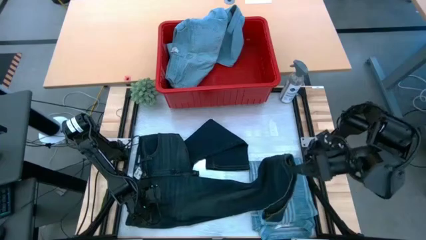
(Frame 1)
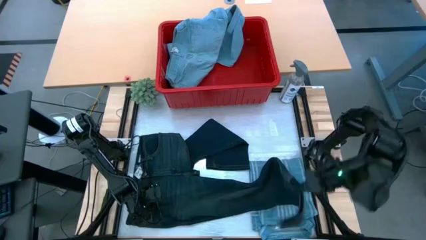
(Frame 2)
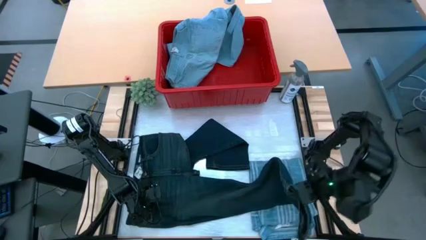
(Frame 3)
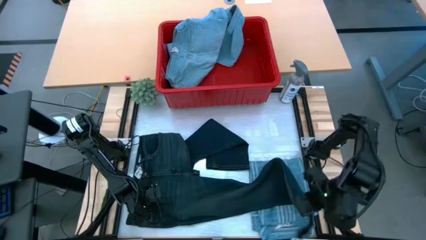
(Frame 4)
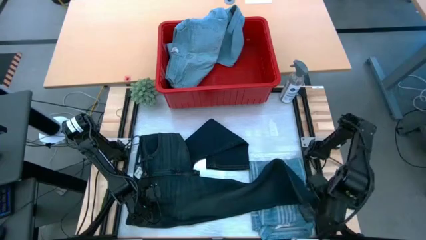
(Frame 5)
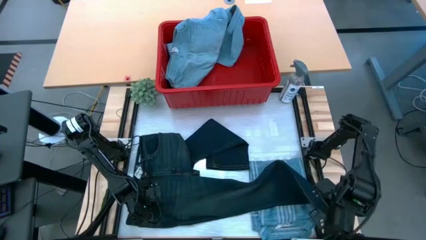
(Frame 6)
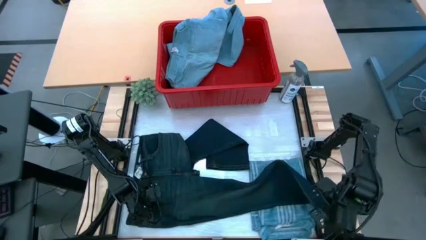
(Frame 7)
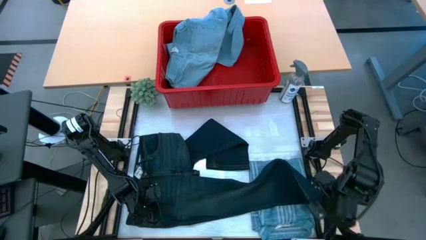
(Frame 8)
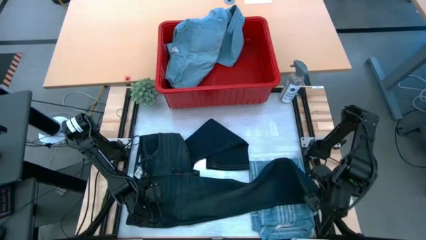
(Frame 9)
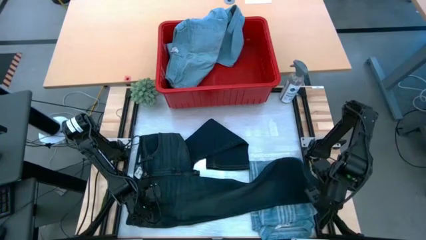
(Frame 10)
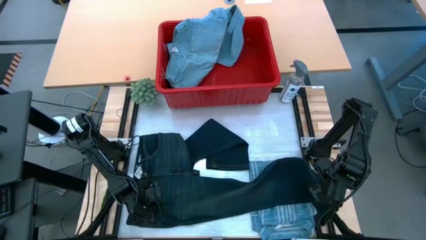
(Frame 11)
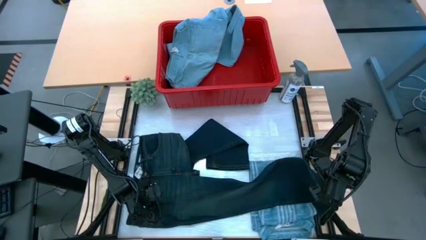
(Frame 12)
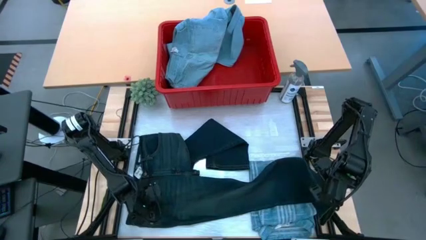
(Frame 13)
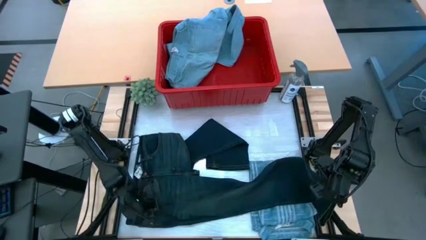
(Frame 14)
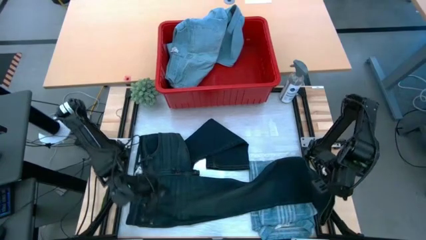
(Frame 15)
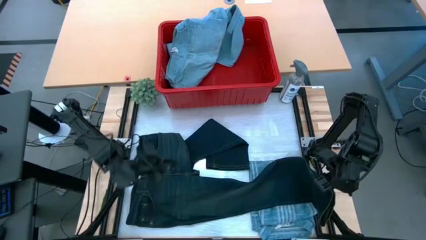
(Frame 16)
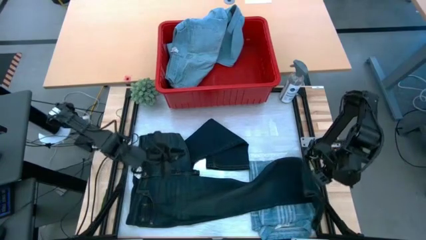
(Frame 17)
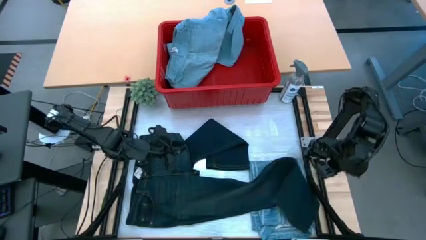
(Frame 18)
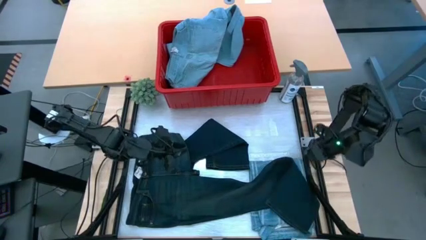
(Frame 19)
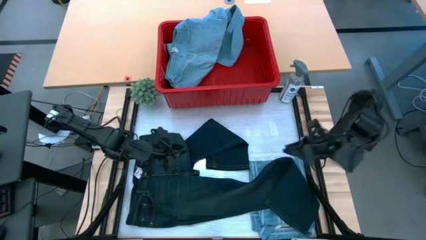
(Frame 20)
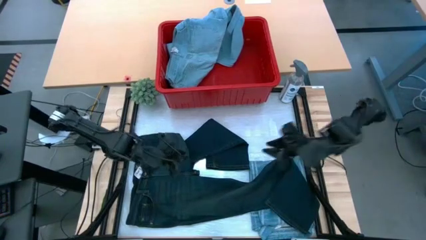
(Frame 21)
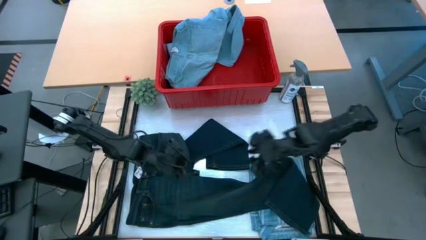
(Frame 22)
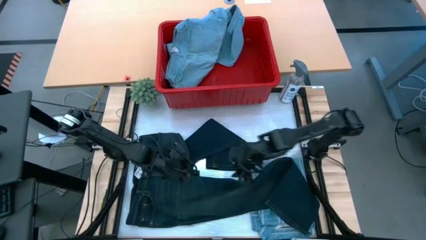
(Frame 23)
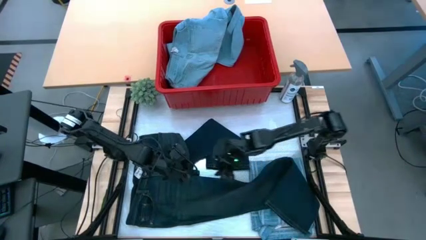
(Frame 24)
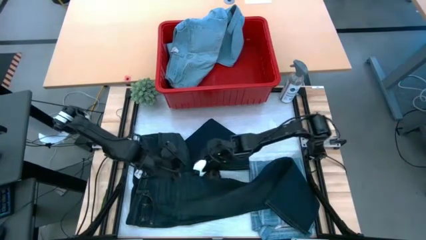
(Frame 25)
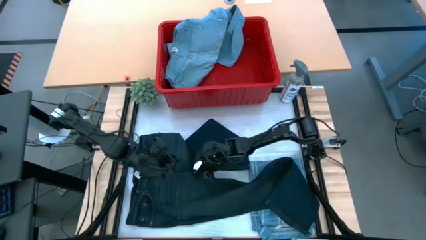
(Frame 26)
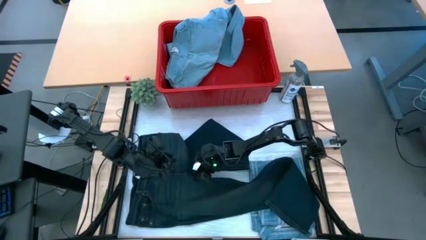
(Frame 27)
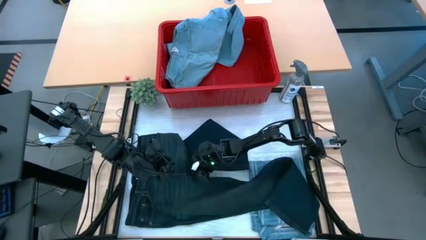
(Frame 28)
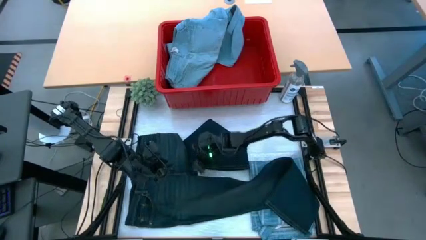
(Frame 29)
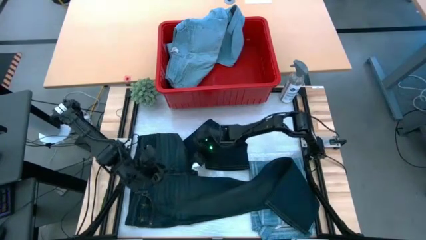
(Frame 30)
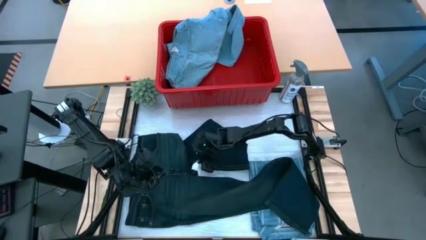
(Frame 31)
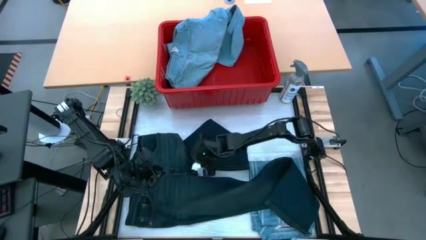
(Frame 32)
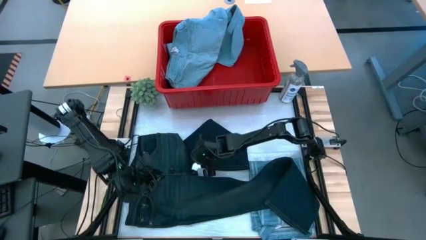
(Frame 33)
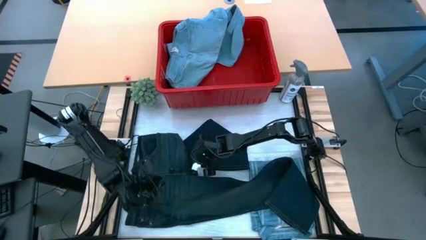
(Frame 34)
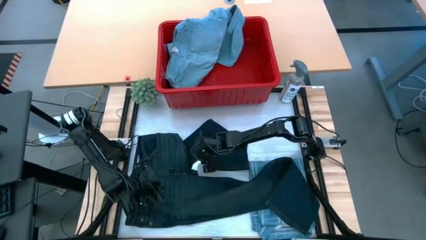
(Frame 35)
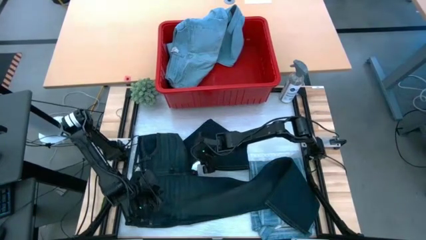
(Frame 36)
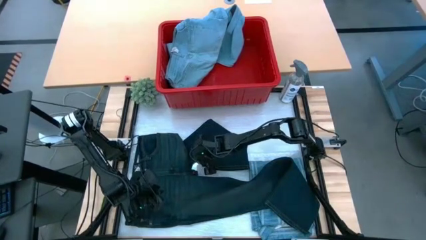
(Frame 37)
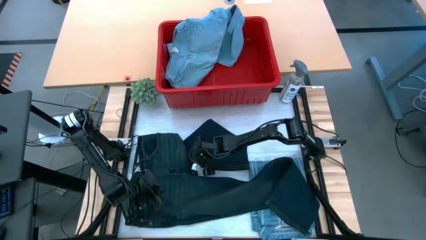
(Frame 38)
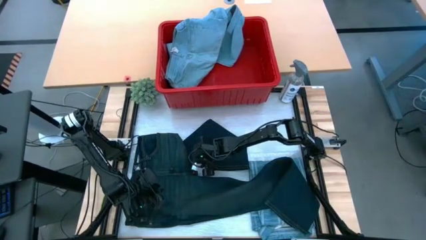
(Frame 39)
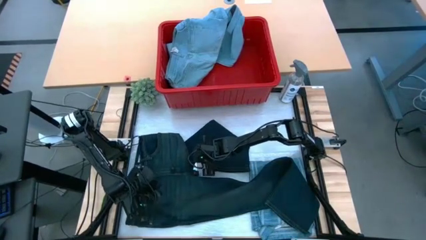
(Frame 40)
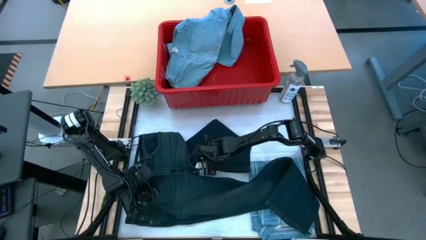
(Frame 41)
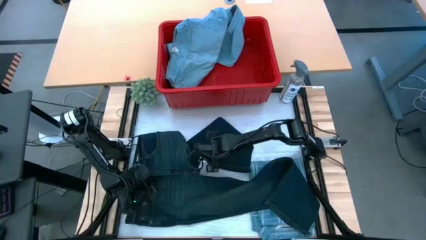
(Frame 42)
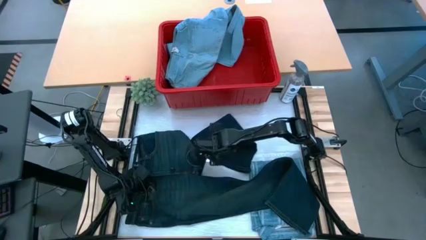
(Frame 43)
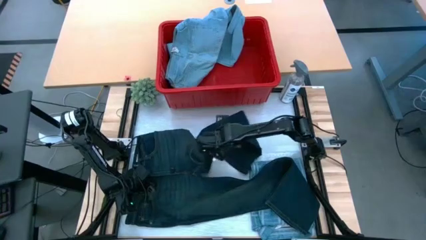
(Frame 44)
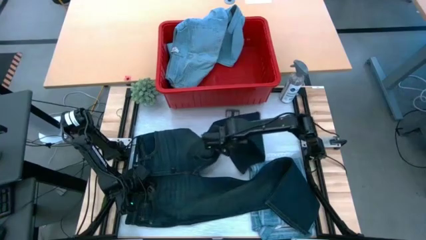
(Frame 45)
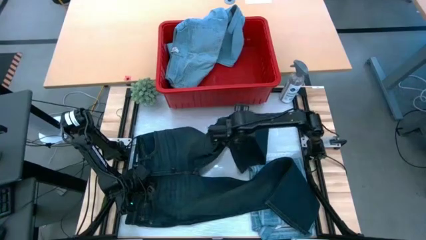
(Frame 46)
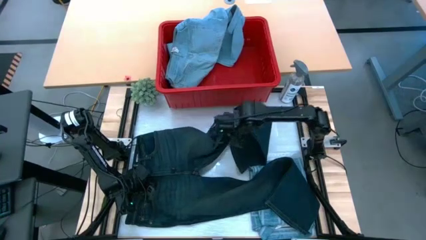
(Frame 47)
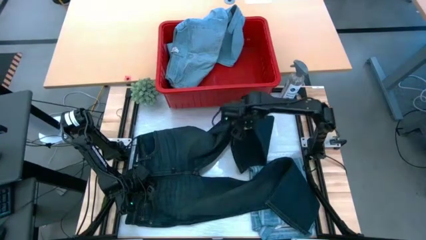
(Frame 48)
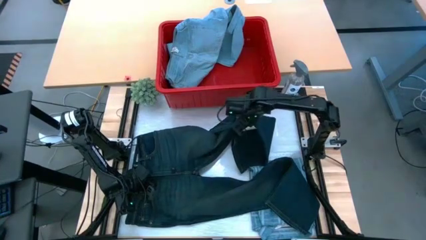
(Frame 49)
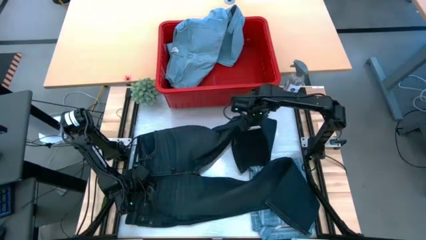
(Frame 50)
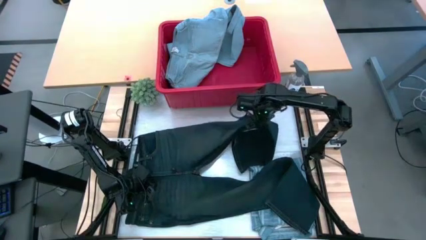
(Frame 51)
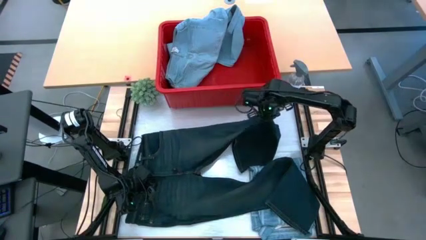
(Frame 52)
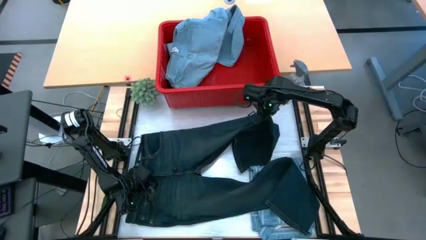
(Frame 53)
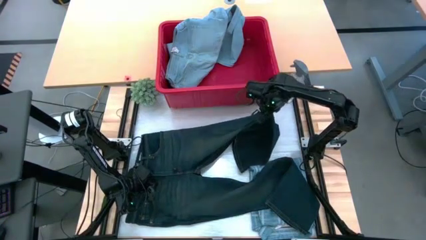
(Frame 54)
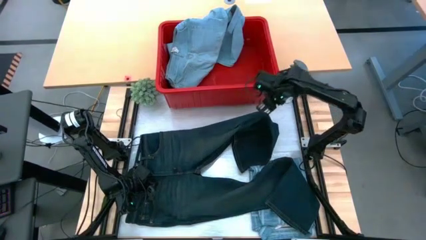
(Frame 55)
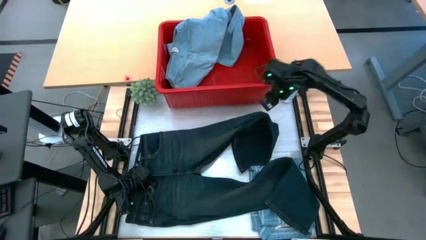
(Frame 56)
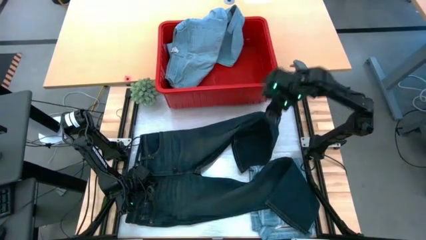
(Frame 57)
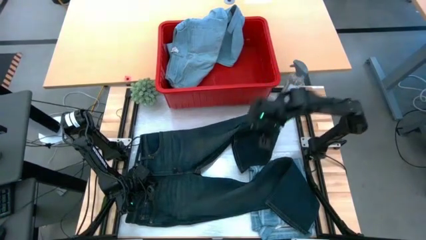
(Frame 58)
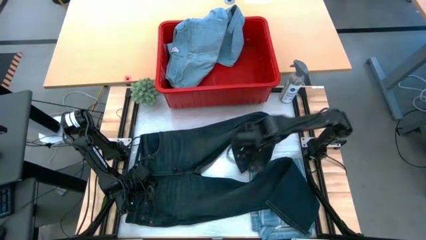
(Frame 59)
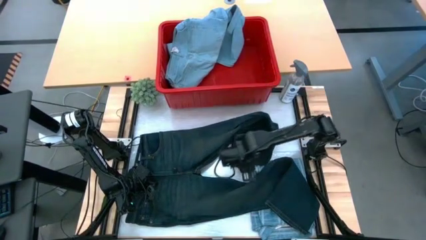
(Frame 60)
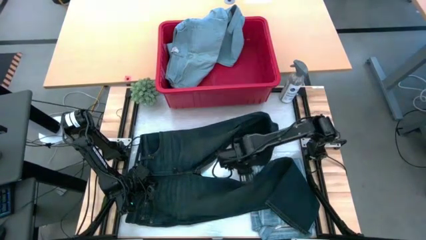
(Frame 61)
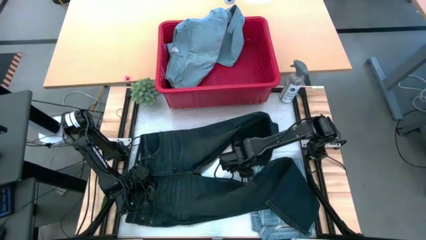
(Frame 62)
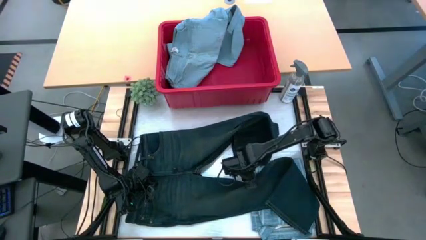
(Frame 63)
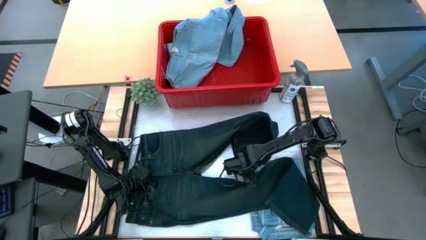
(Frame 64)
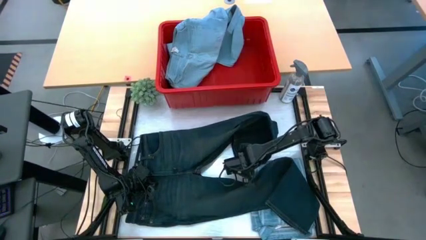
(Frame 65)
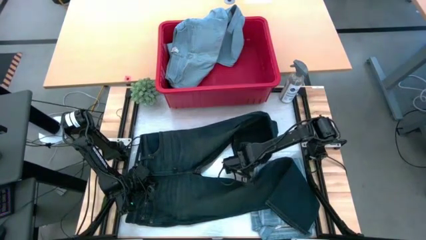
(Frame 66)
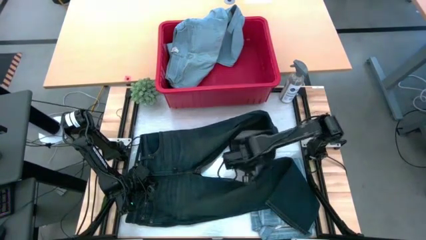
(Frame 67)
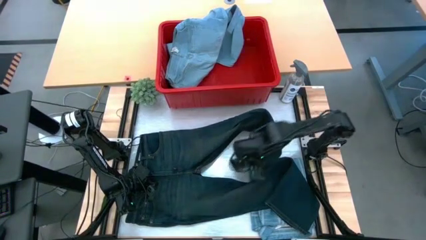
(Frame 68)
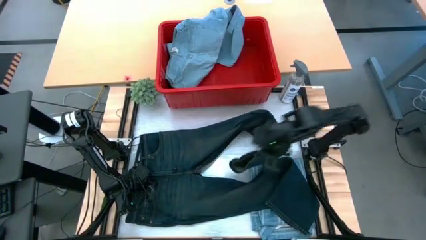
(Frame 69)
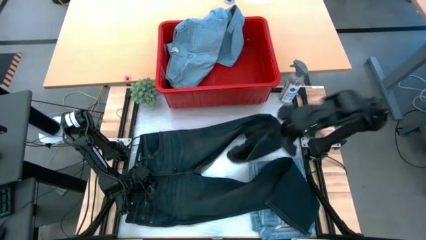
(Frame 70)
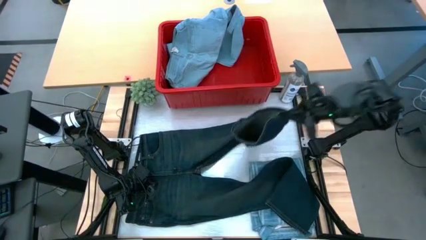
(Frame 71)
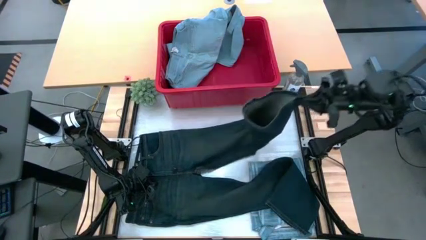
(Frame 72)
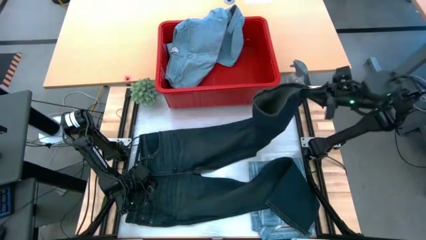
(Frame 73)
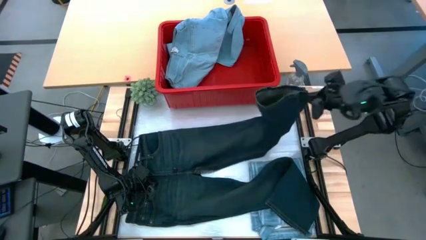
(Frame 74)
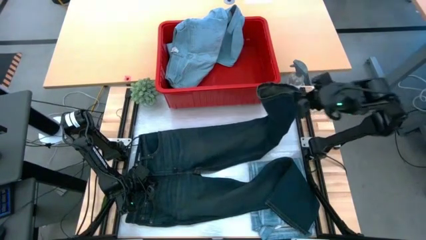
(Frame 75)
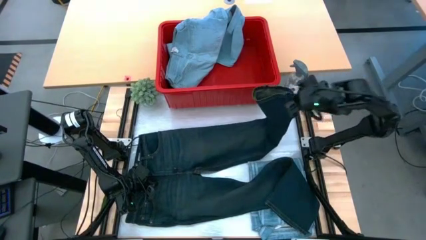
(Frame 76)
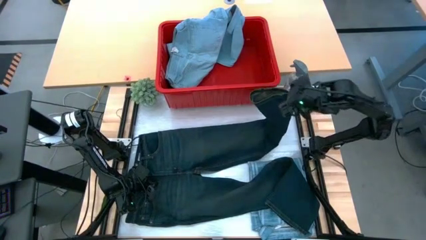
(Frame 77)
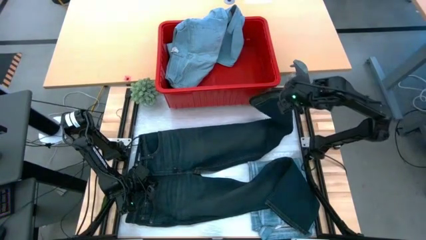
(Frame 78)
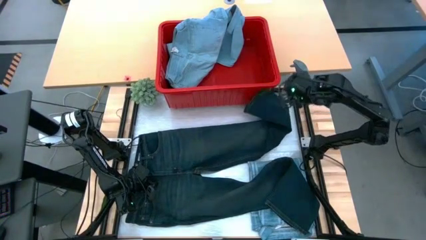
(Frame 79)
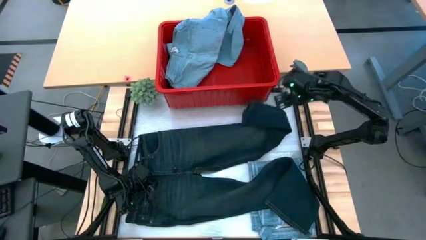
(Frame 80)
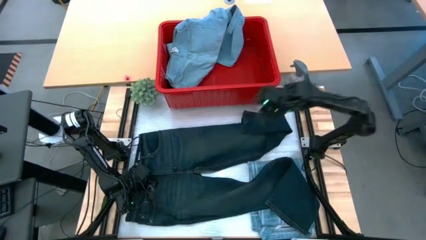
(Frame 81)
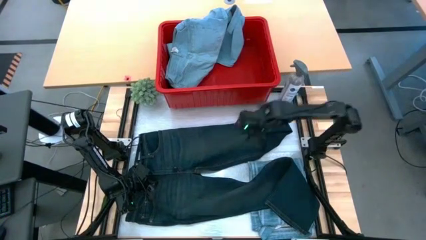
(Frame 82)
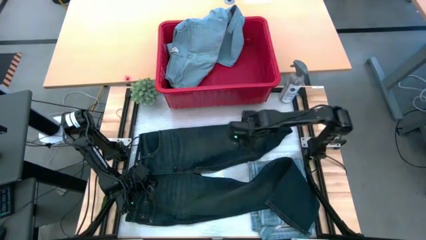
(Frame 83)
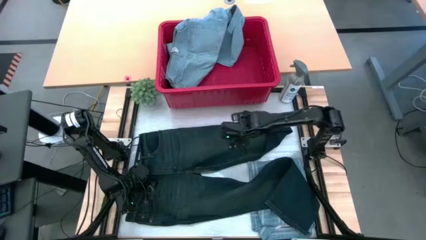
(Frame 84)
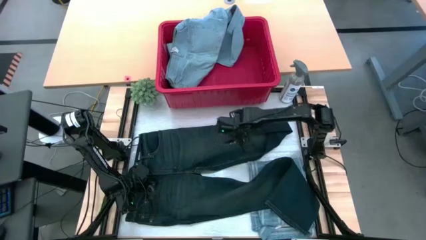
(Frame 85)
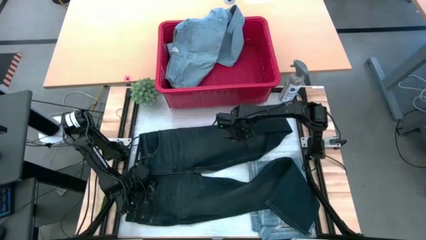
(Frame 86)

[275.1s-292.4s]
Task: Fold Laundry from Bin
Fold the blue denim pants
